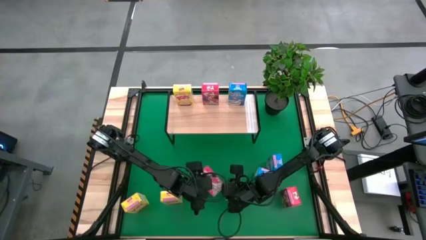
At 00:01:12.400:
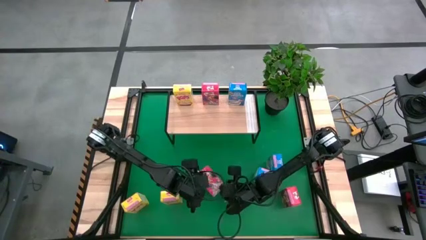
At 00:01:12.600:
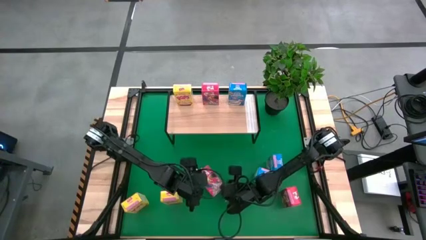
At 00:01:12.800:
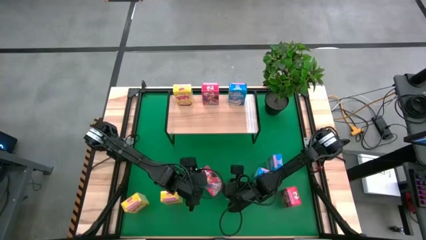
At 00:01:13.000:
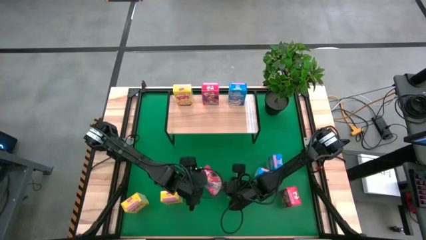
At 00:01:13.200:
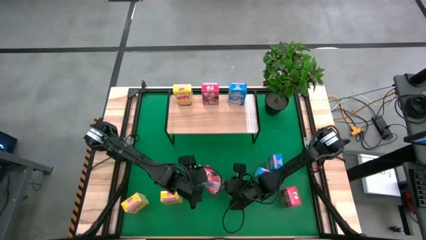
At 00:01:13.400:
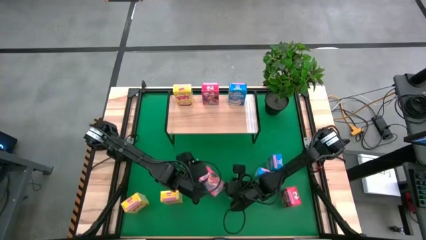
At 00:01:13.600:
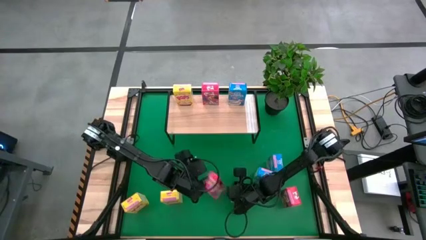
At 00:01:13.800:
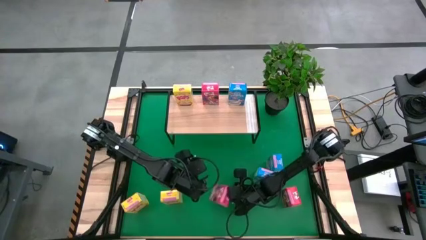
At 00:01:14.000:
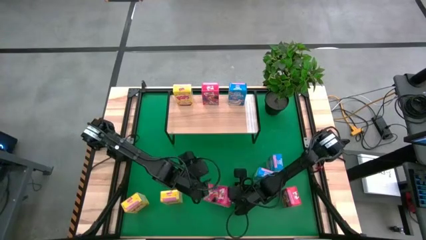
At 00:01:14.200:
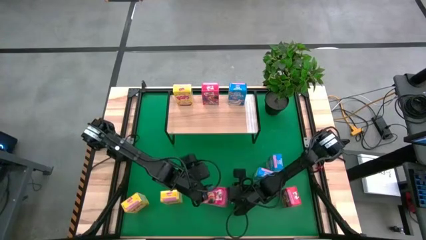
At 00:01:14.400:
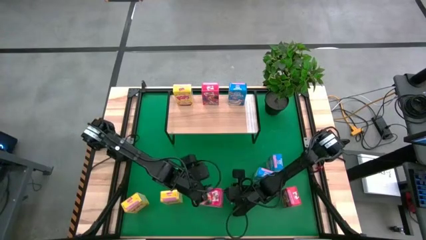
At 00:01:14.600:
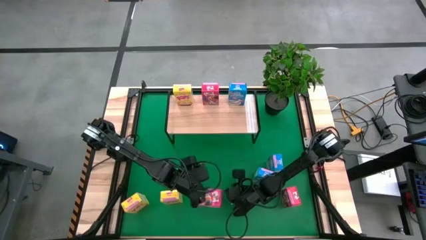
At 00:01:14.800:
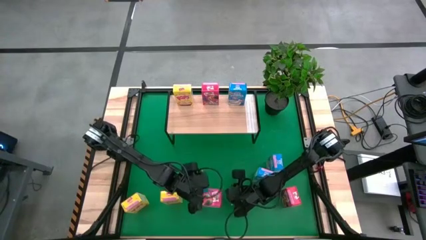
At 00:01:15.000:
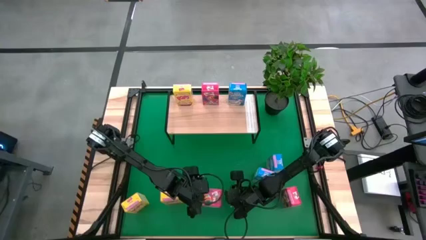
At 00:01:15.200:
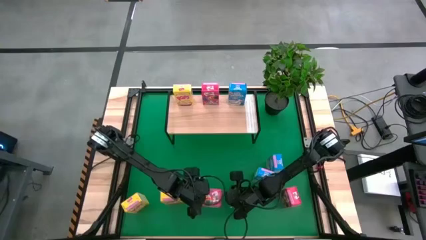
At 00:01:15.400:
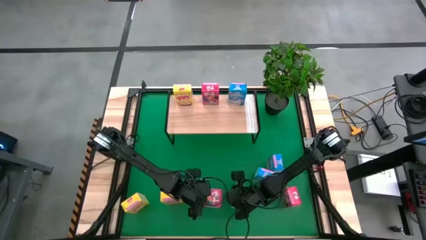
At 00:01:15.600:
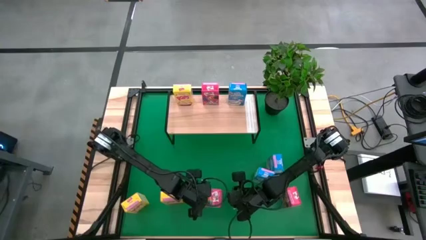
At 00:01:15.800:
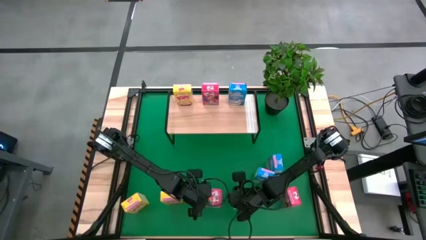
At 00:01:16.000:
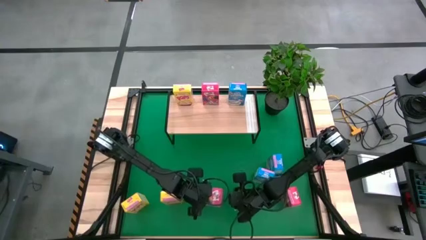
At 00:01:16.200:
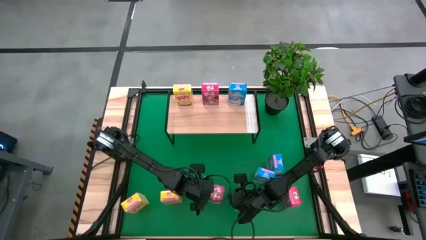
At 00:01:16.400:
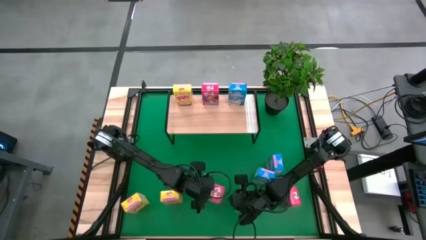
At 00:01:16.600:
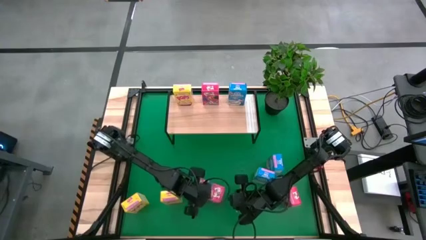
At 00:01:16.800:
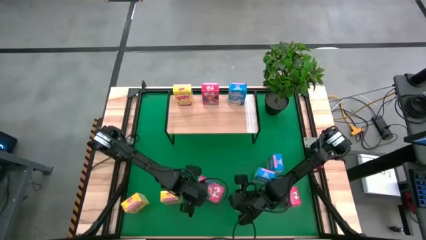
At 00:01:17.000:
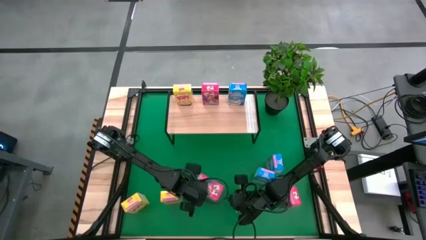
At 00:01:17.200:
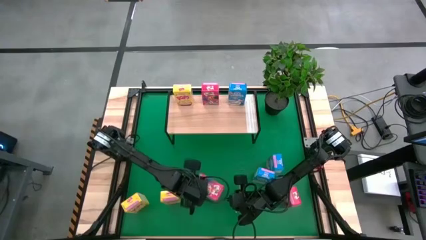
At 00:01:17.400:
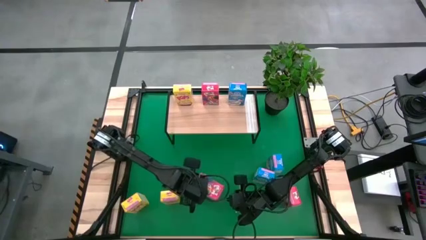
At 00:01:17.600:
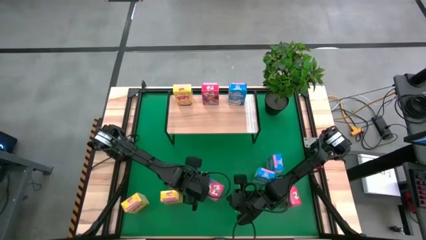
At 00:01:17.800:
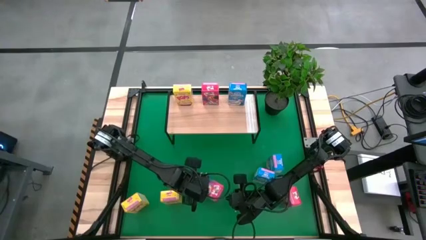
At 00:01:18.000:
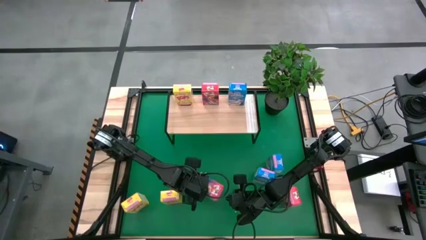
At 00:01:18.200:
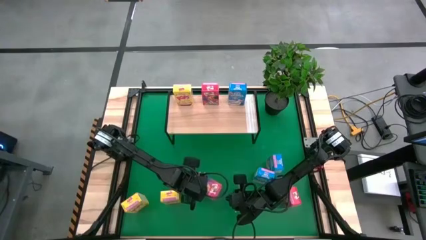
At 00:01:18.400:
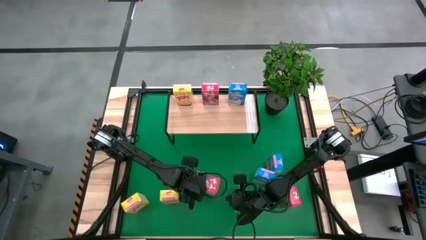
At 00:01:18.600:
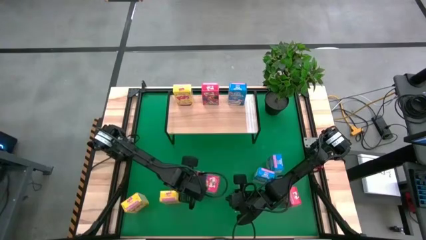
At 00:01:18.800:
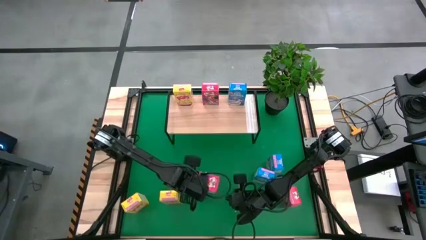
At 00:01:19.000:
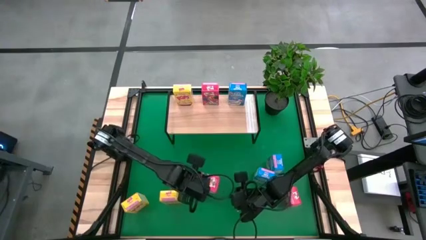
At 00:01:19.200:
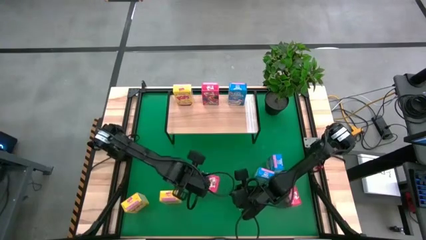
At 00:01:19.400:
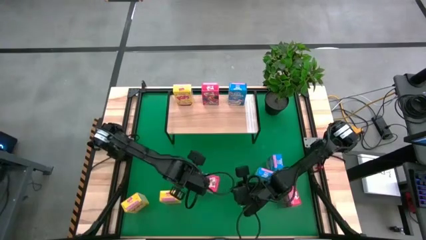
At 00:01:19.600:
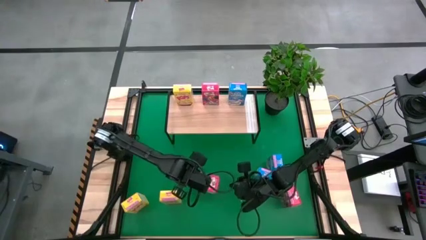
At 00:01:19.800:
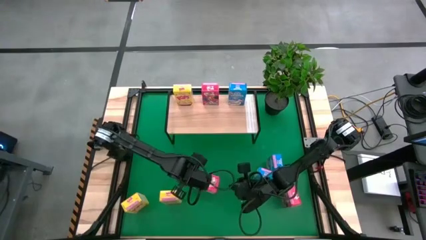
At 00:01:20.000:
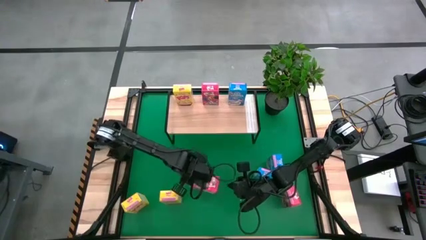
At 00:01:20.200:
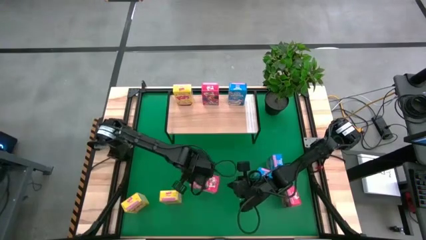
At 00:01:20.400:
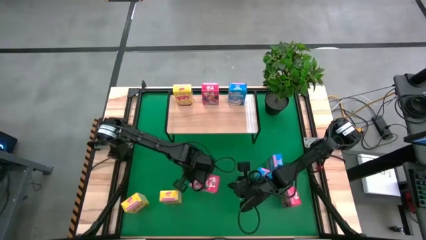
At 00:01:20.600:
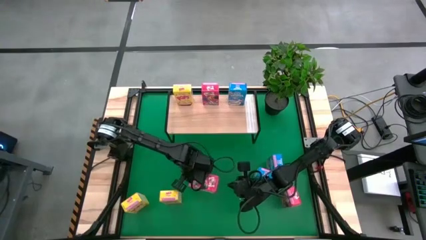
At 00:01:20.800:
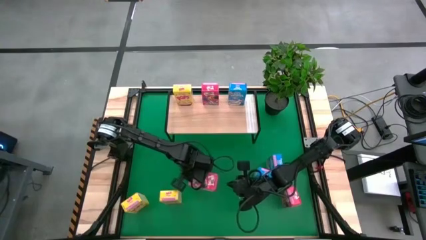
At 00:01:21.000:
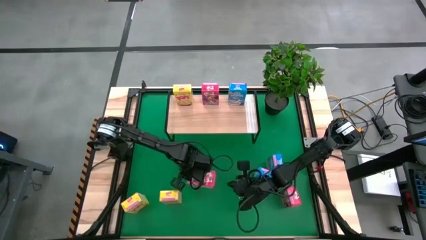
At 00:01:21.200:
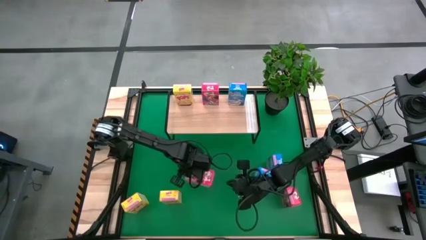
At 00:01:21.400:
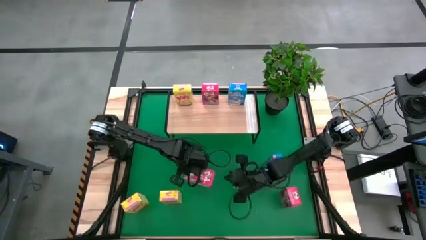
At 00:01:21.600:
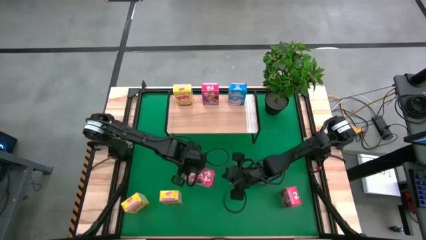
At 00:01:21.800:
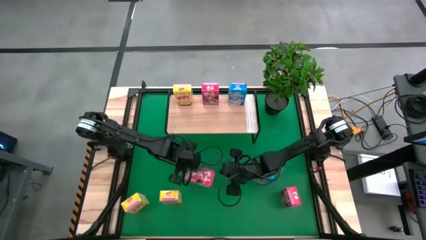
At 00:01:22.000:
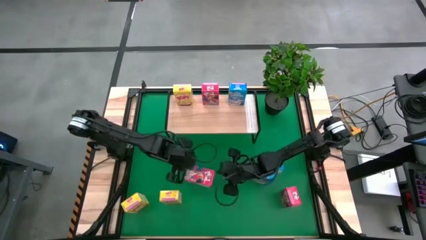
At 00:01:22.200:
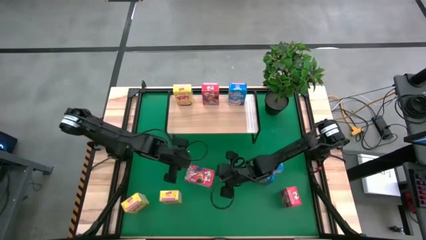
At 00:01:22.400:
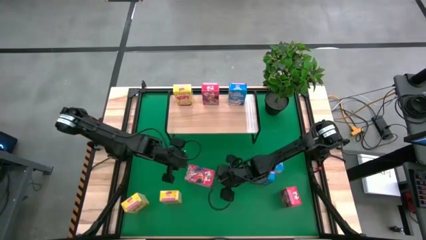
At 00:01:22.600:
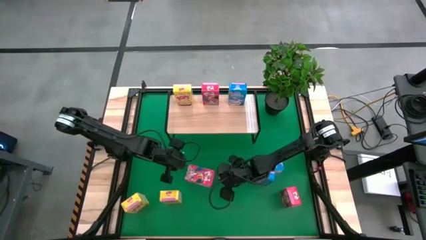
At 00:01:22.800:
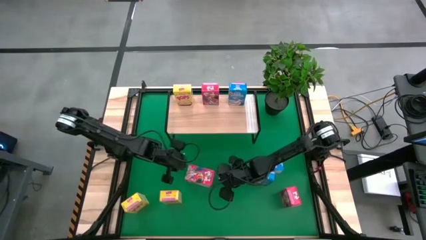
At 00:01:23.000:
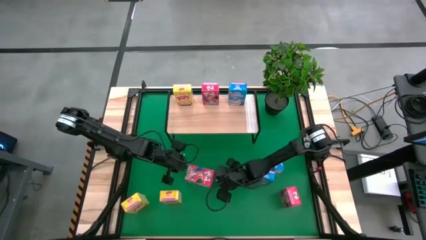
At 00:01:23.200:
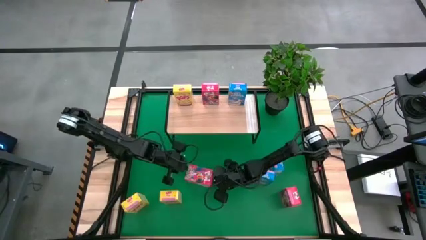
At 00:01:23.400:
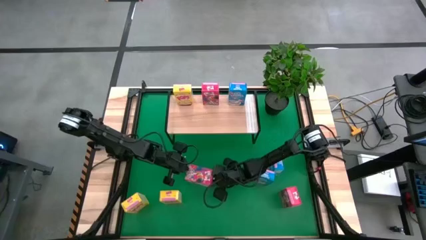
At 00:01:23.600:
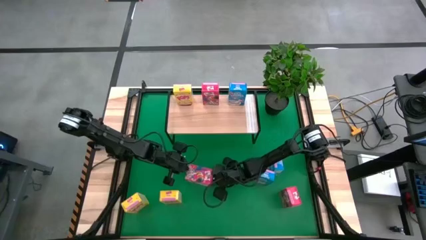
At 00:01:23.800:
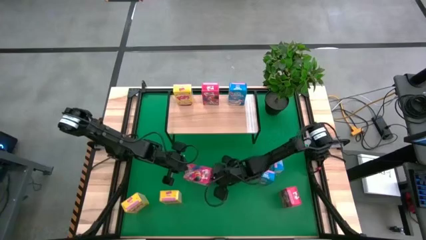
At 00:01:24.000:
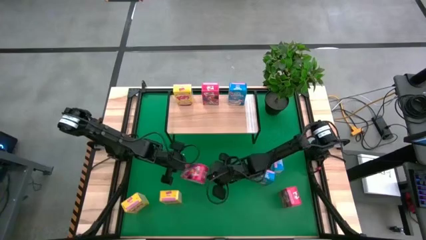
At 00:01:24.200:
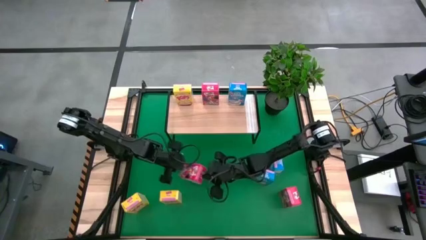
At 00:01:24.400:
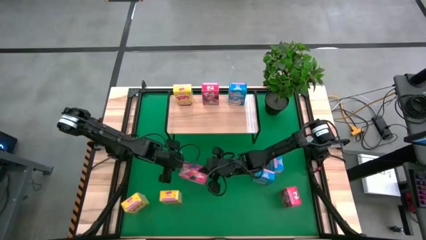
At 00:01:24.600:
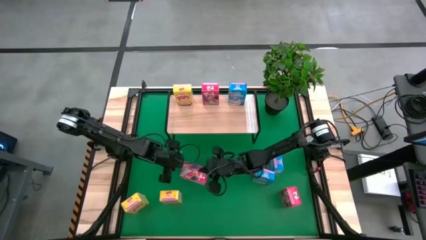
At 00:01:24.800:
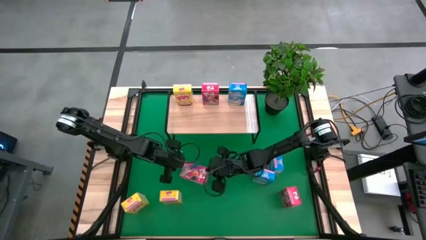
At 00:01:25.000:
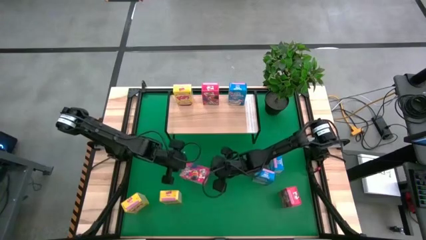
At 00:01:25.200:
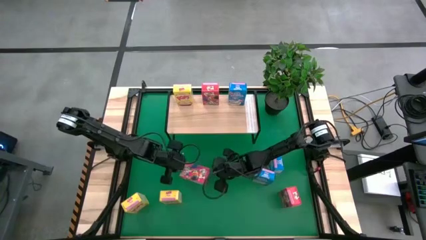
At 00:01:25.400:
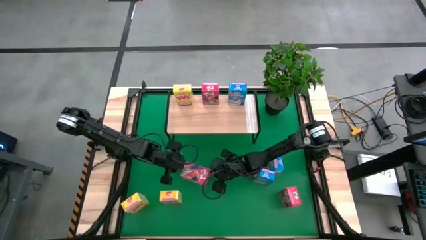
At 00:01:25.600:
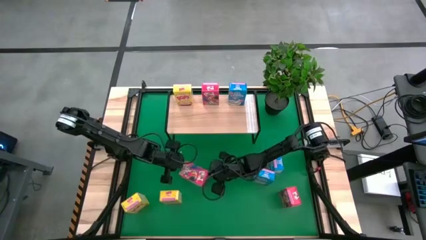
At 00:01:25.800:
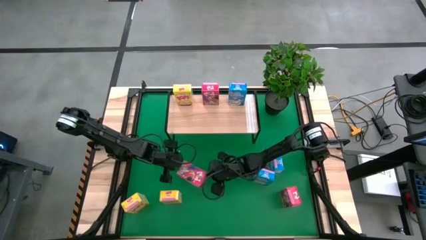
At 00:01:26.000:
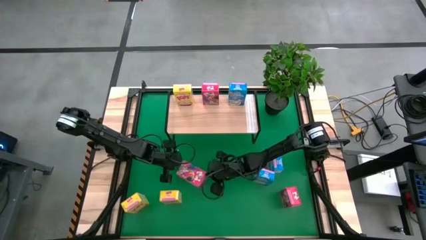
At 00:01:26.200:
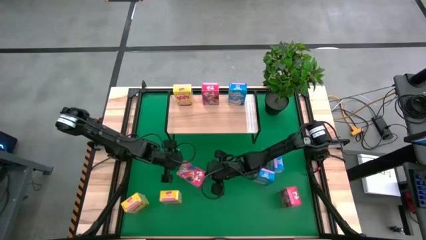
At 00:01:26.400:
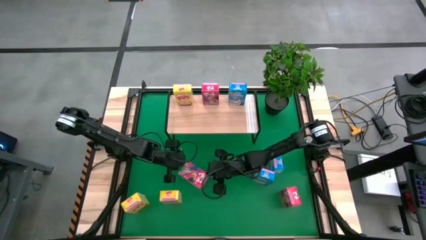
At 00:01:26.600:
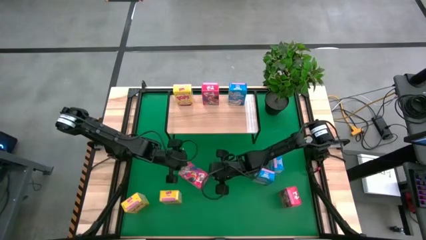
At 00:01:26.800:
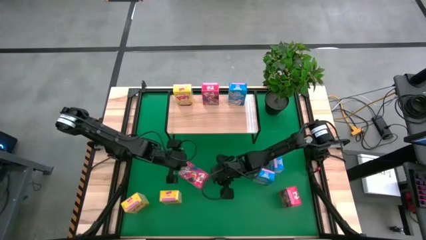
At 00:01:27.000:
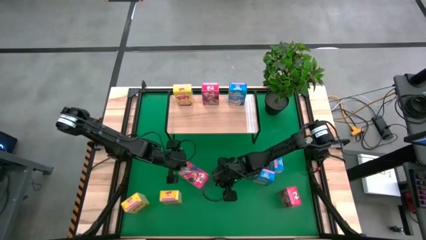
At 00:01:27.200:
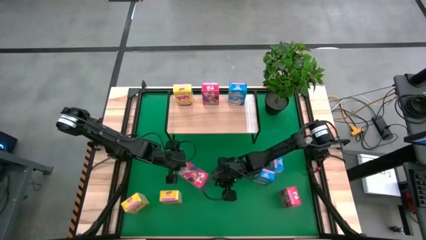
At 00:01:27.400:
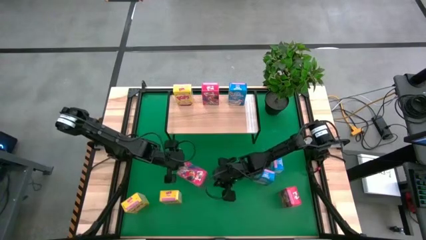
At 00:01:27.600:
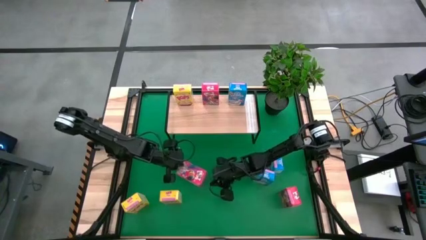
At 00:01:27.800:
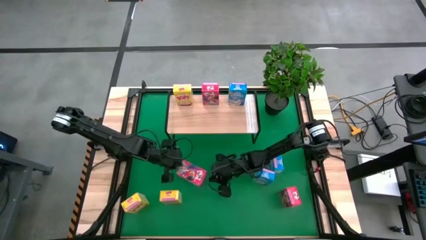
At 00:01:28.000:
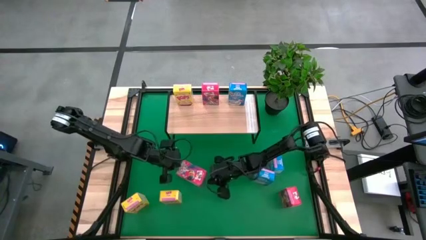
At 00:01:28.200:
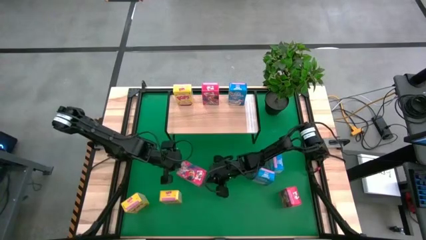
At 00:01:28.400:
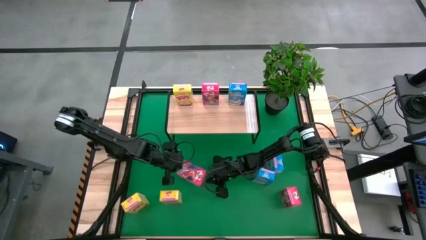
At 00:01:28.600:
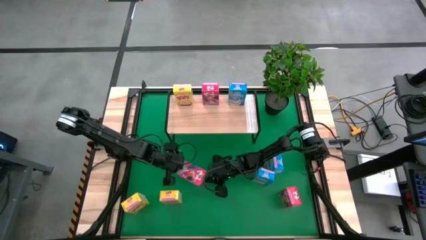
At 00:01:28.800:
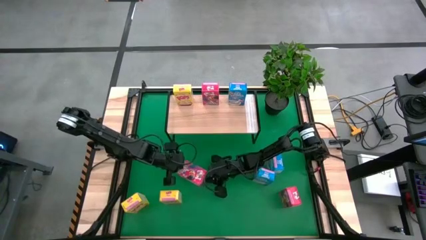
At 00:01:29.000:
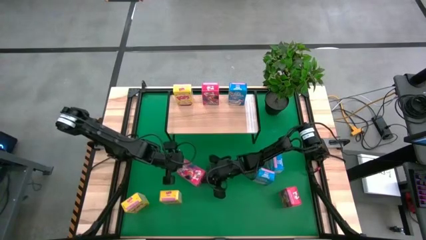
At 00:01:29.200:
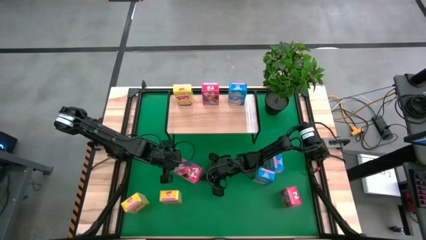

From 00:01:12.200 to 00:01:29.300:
Task: Stack cereal on shelf
Put the top red cereal box on the shelf aligned with the other red cereal box
